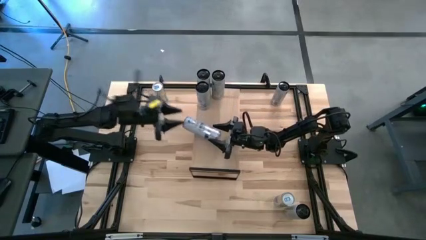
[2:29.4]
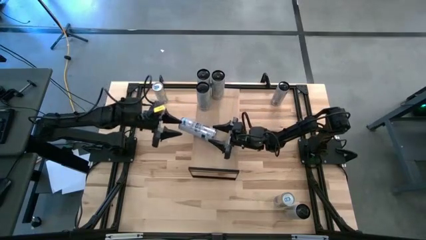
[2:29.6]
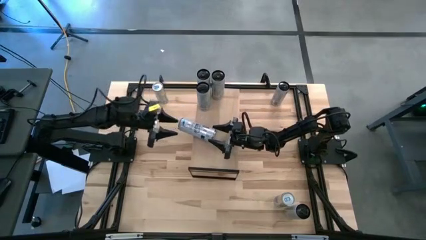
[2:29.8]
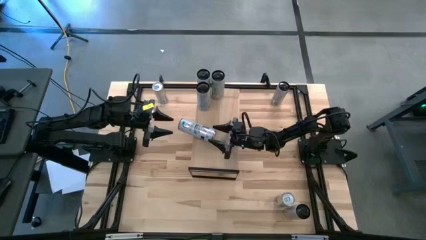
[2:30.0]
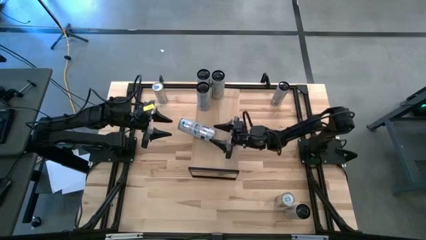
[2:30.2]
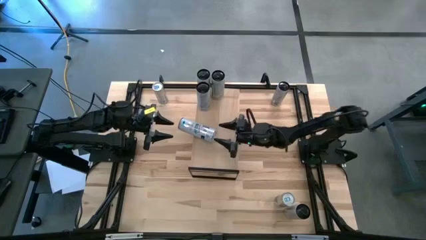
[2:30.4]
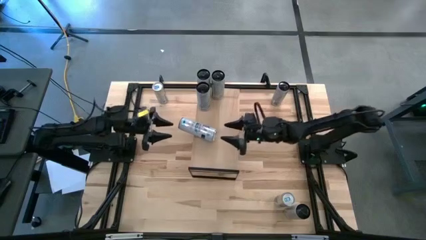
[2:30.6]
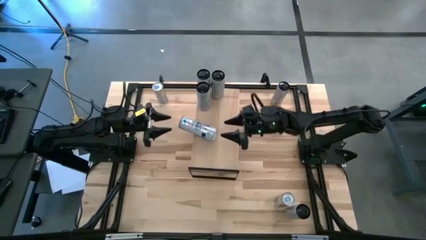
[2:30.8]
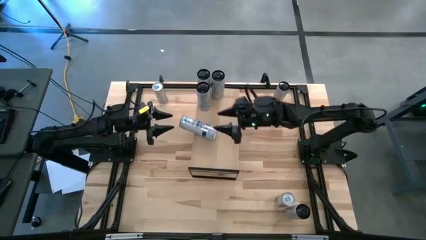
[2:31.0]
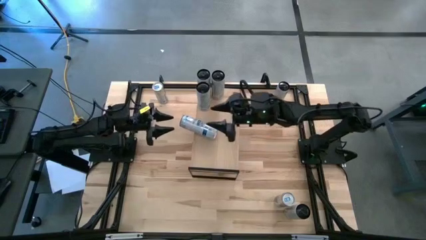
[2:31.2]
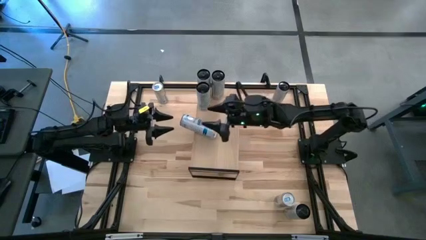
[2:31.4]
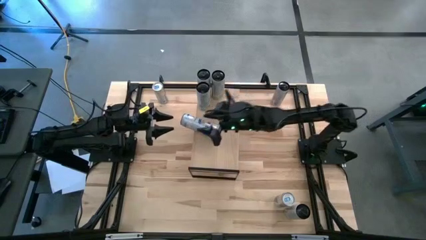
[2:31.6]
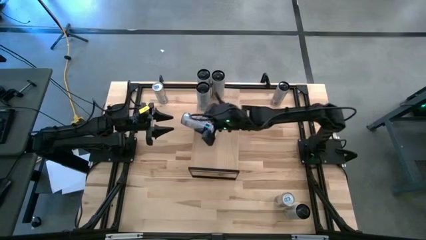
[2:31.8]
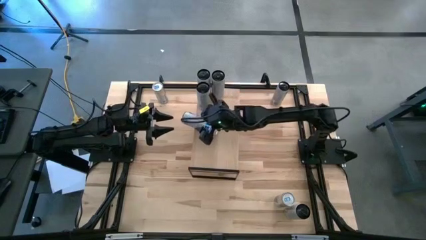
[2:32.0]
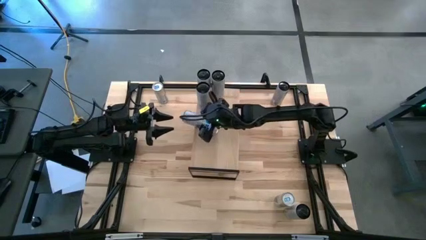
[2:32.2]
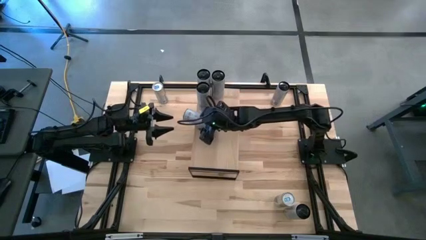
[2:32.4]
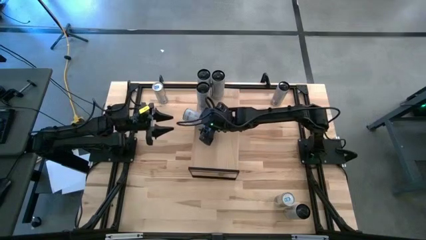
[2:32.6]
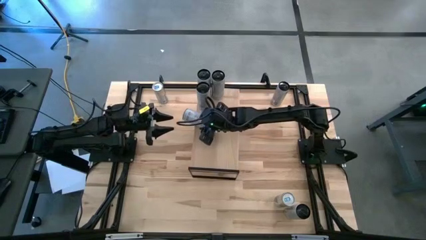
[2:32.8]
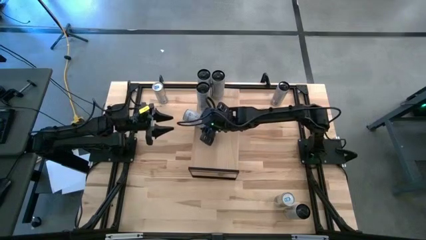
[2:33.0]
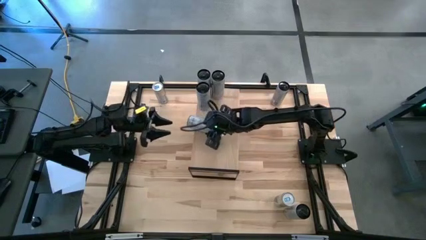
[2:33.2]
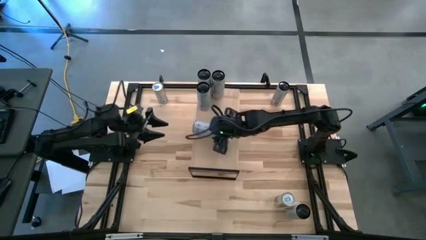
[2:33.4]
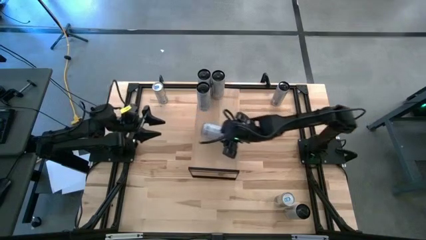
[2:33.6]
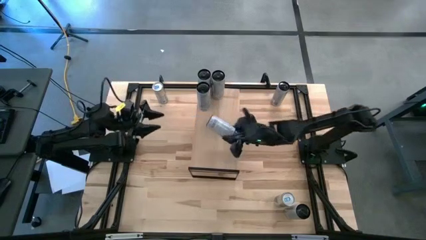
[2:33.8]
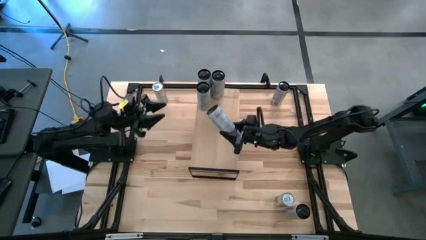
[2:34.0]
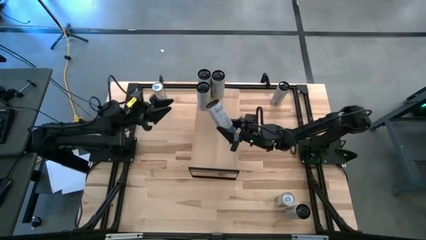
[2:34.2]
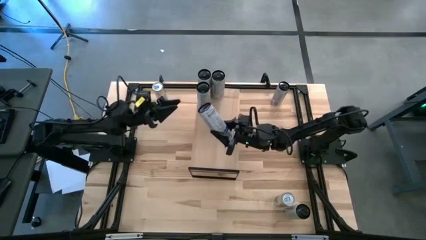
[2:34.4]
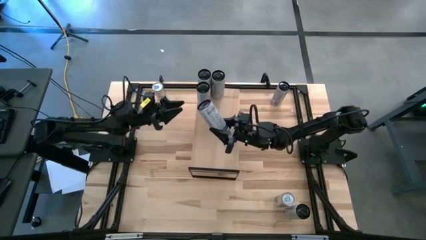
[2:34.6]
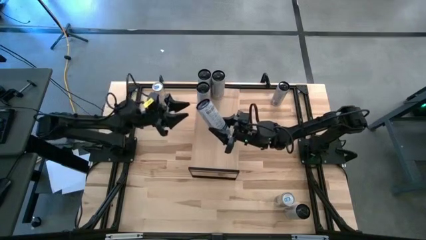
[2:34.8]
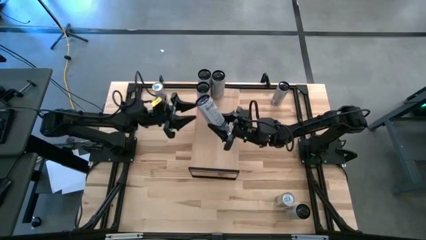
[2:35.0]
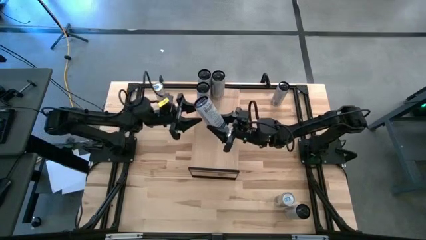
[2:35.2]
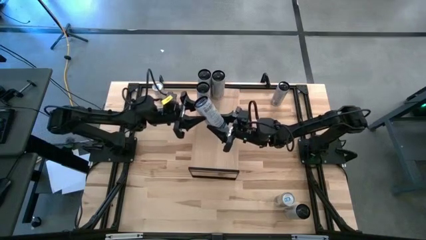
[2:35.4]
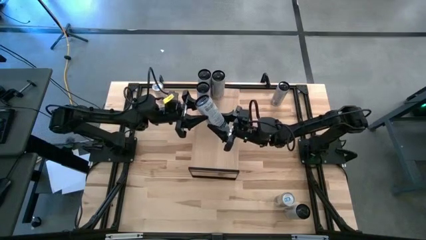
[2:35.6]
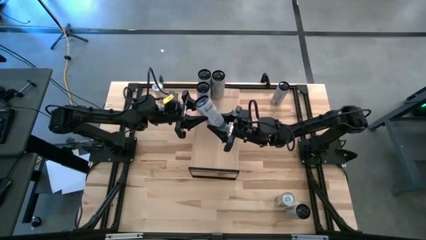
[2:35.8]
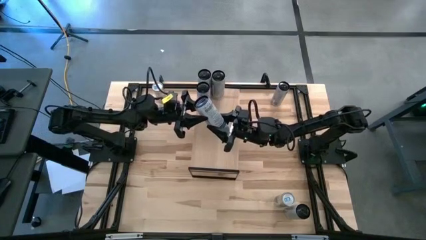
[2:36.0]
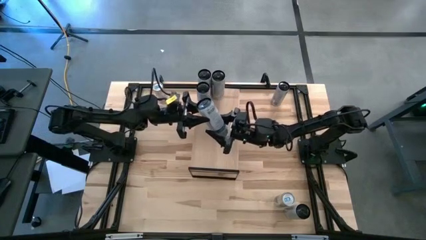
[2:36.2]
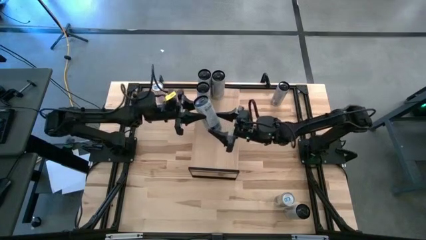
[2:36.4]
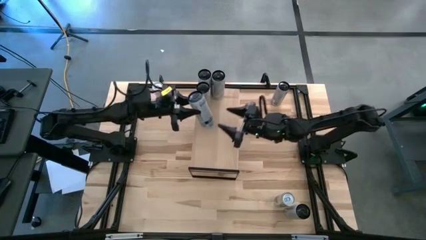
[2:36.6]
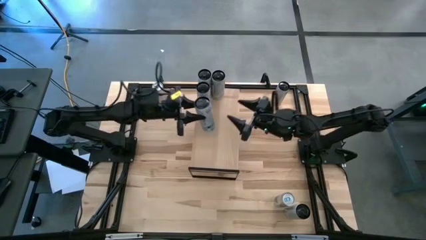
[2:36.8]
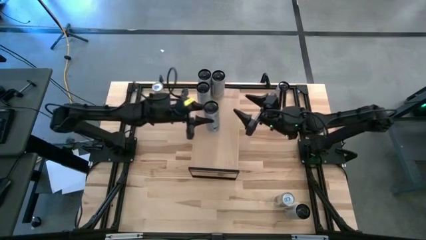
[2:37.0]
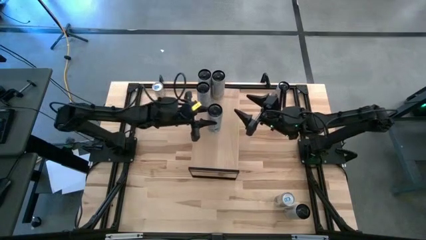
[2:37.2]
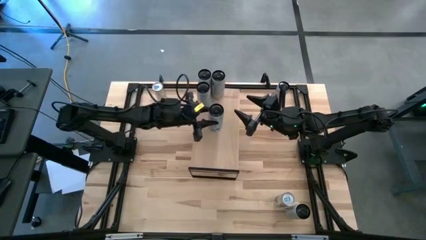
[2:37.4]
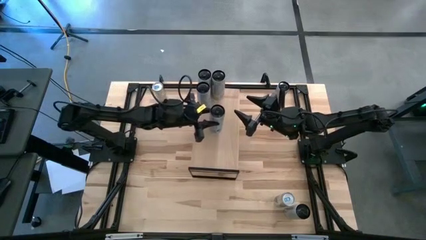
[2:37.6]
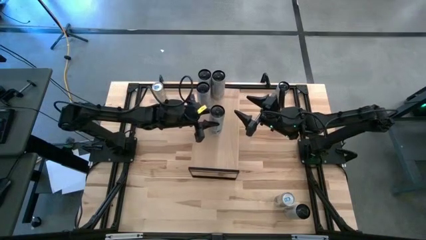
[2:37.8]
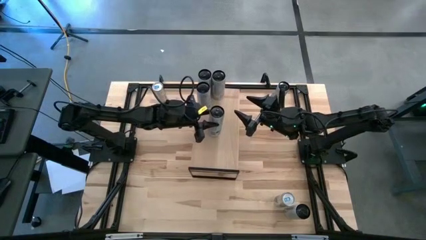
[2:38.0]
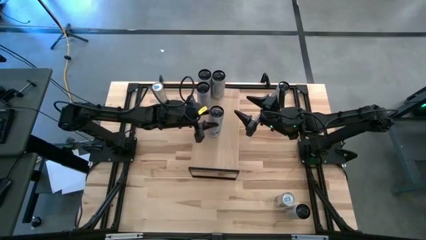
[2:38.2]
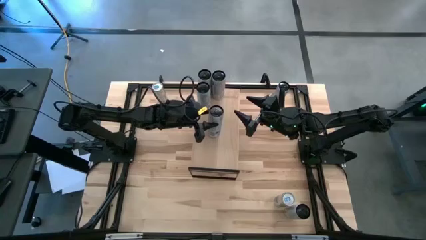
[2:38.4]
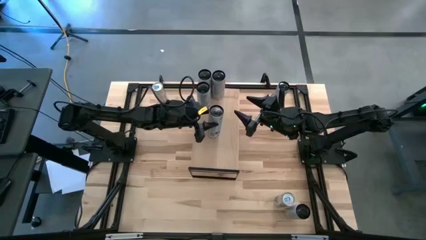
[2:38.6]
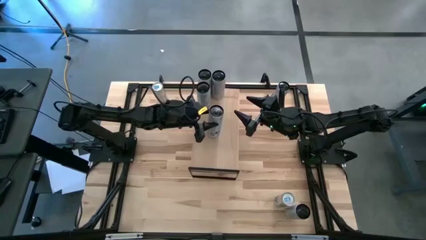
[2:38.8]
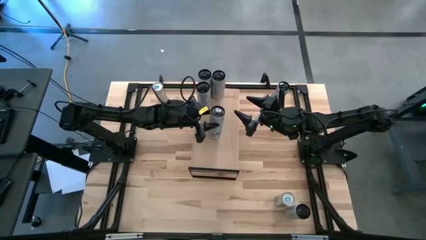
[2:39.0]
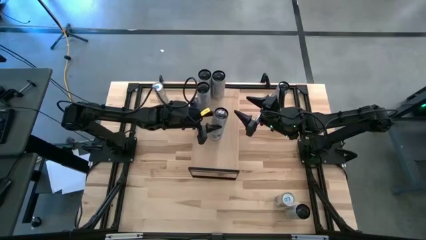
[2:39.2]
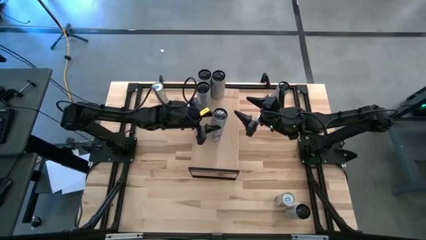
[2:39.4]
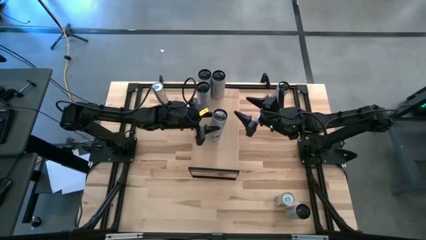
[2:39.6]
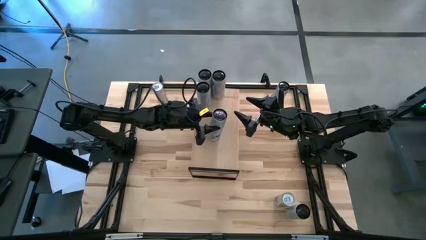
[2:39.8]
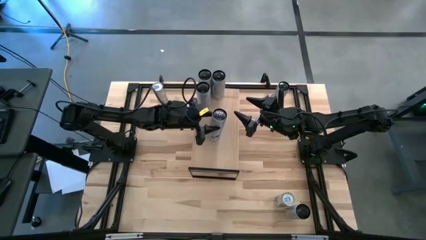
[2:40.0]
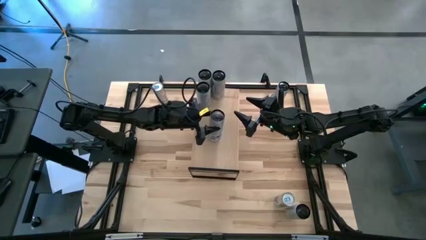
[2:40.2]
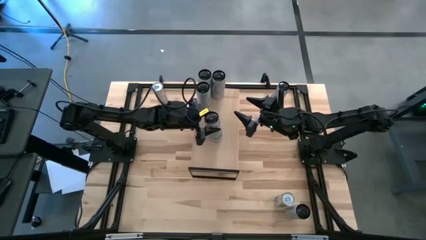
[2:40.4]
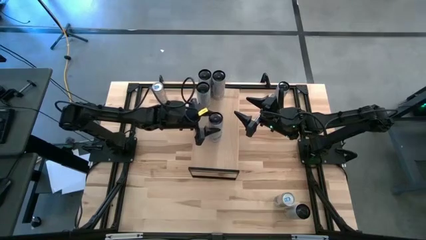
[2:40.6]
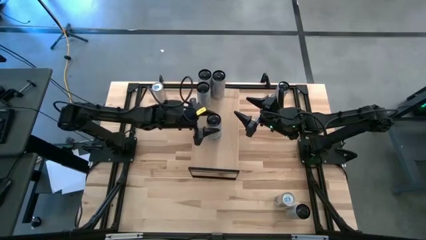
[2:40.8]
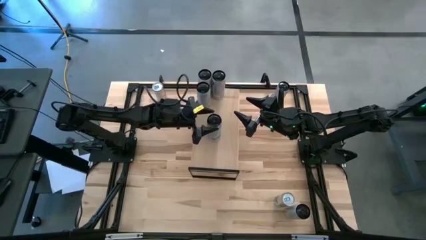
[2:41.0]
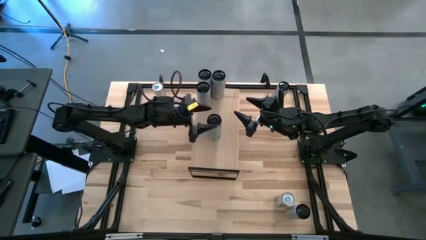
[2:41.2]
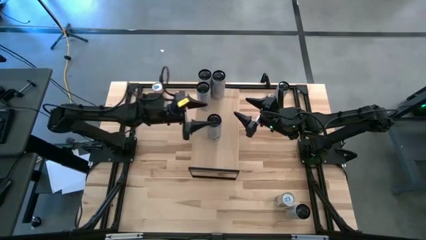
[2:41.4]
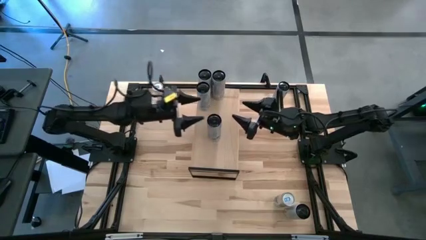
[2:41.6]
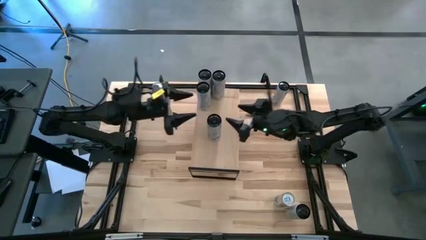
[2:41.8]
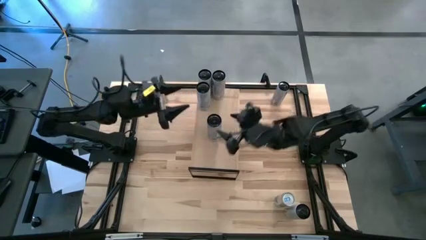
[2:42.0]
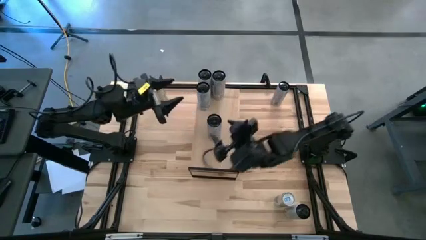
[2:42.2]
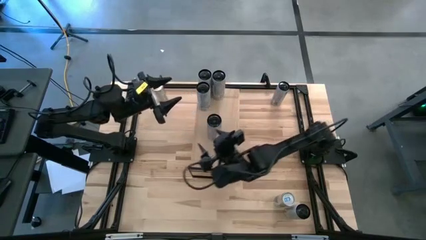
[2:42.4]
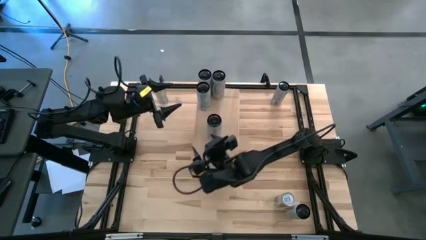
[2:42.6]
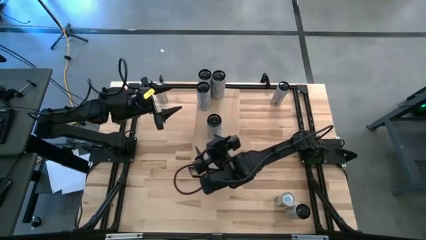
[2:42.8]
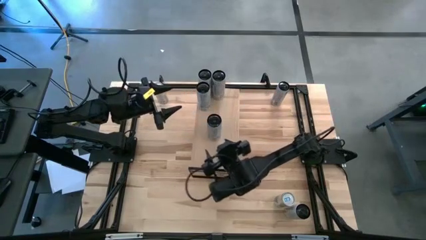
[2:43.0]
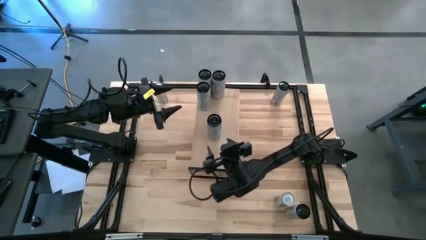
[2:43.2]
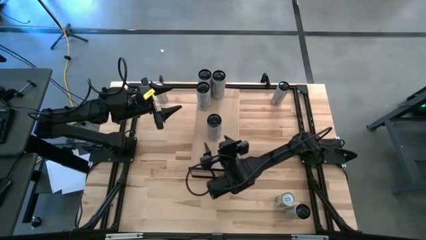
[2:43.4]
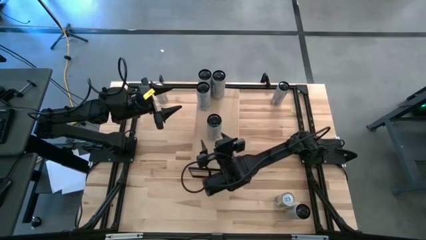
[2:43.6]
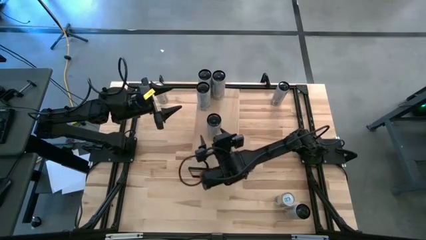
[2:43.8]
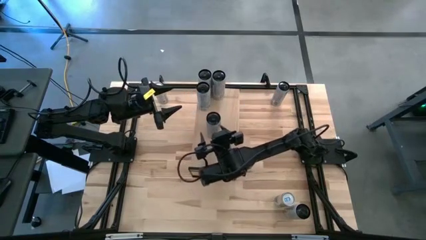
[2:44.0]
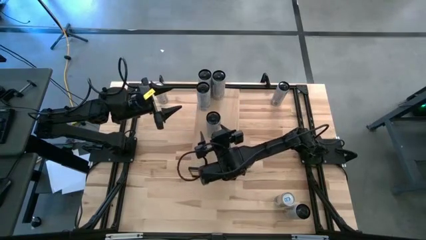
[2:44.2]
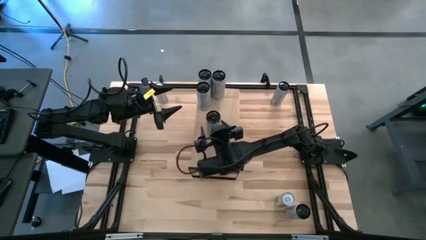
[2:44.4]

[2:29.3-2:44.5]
Task: Place canned beverage on shelf
Put the white blue soda can on the shelf aligned with the white blue soda can
